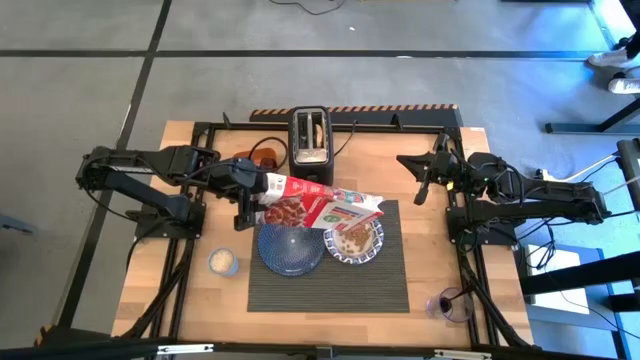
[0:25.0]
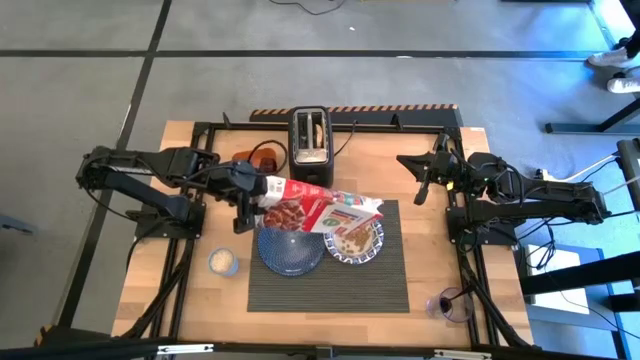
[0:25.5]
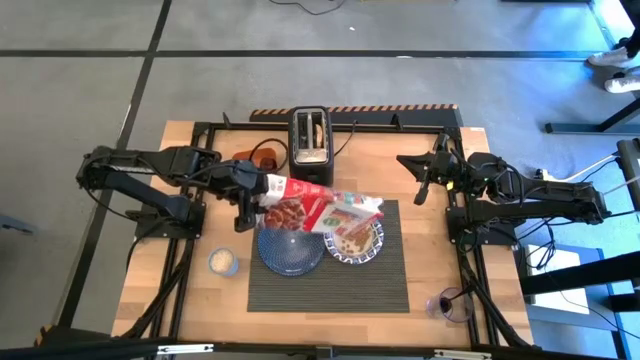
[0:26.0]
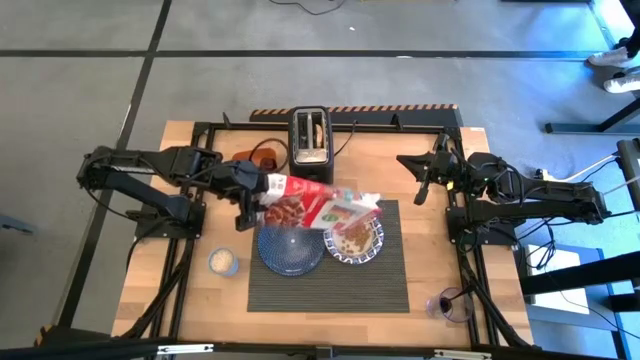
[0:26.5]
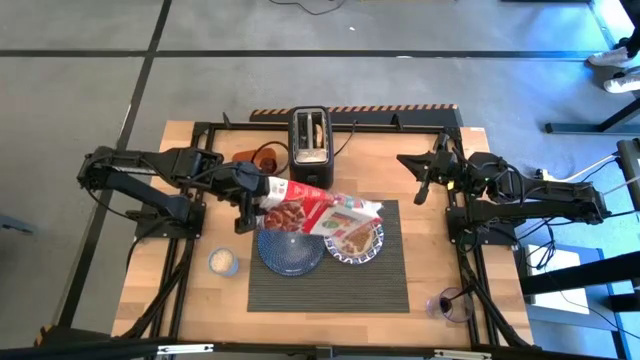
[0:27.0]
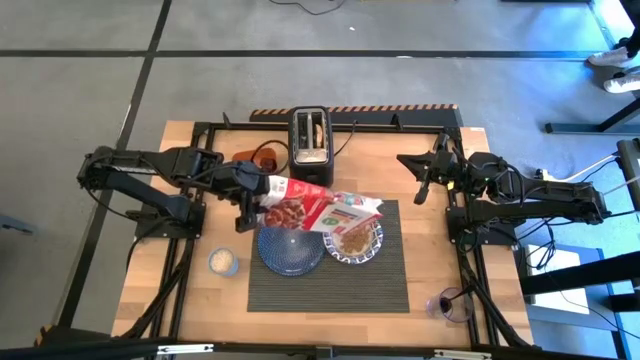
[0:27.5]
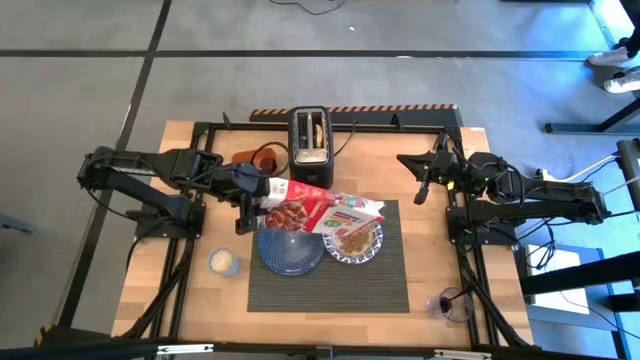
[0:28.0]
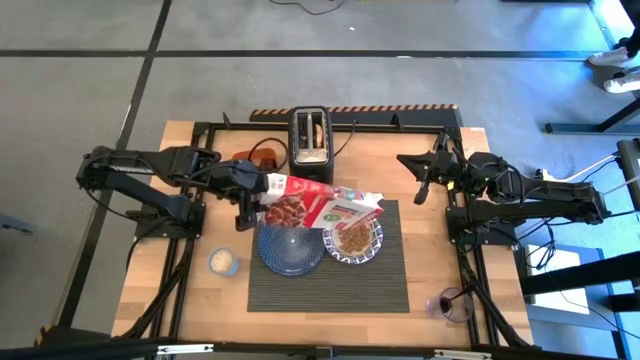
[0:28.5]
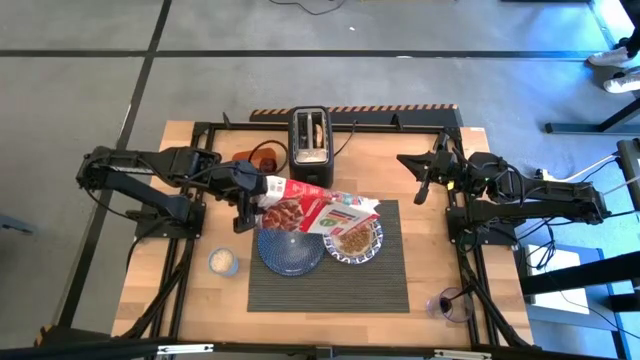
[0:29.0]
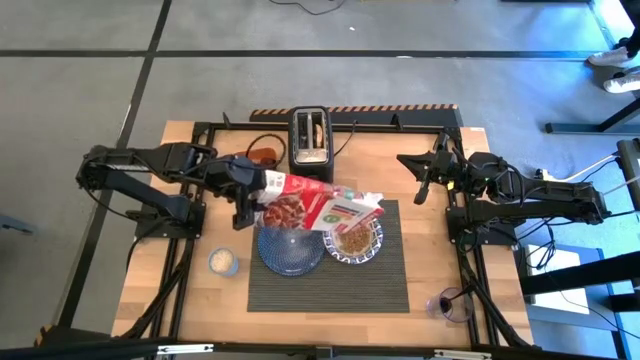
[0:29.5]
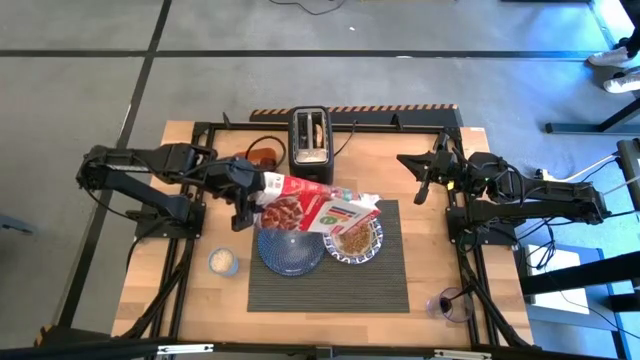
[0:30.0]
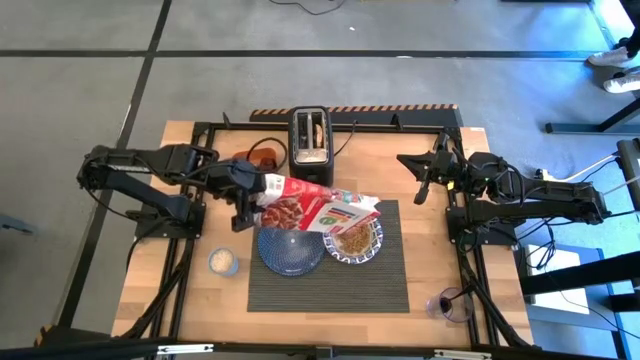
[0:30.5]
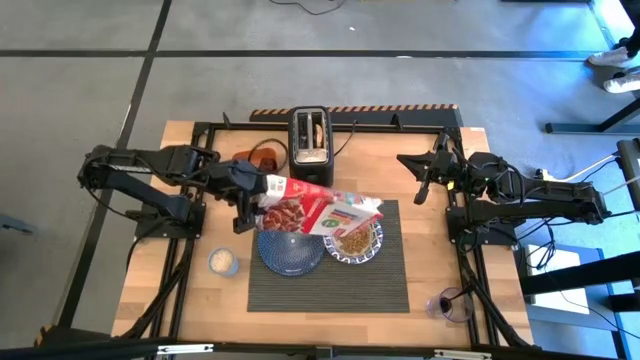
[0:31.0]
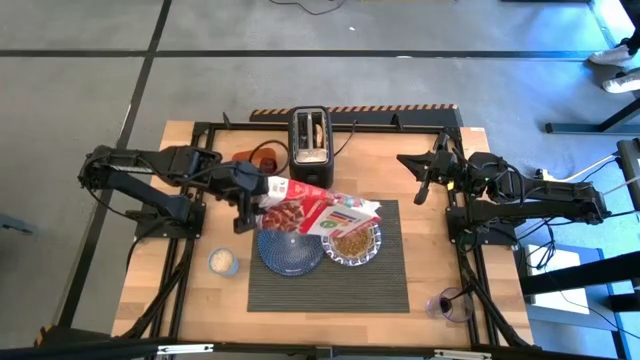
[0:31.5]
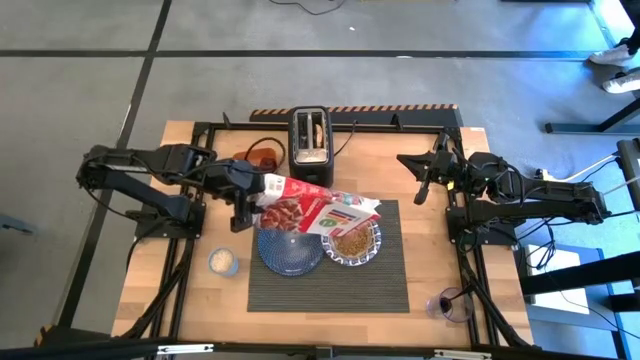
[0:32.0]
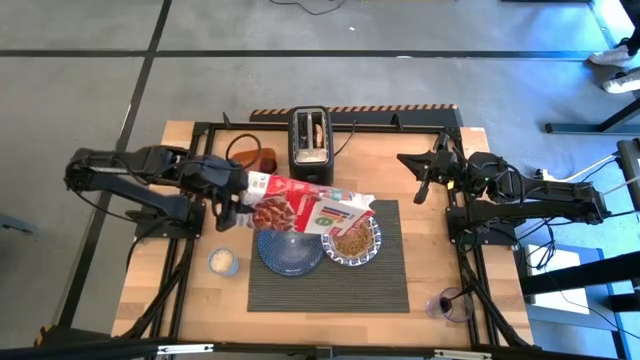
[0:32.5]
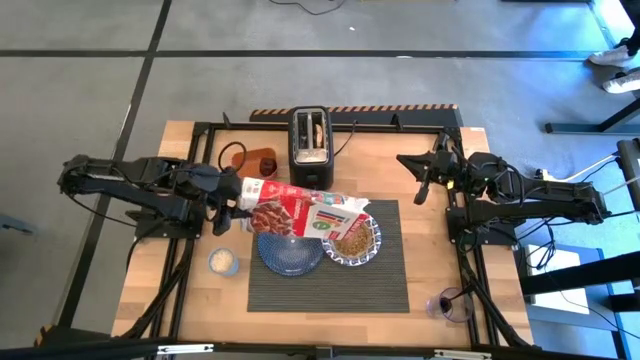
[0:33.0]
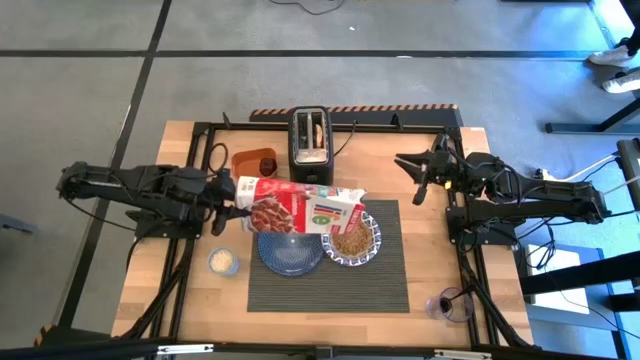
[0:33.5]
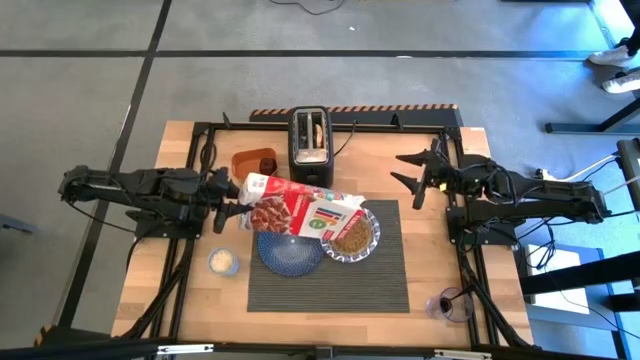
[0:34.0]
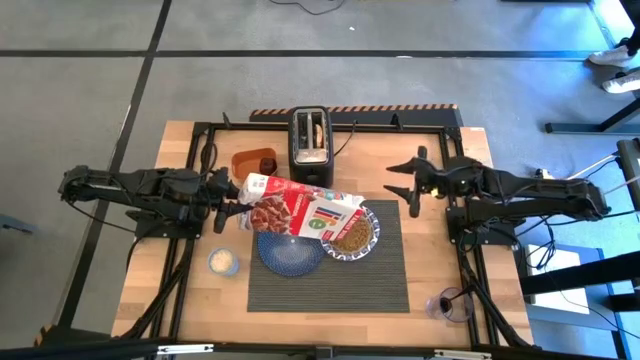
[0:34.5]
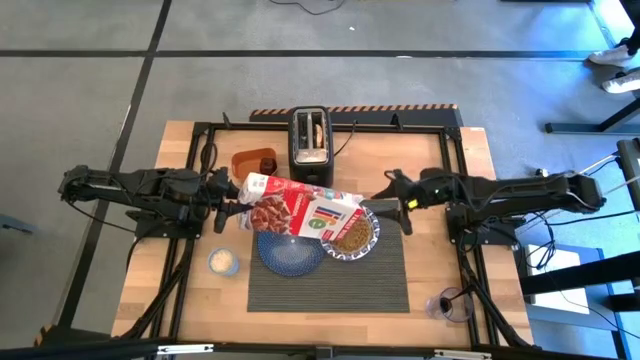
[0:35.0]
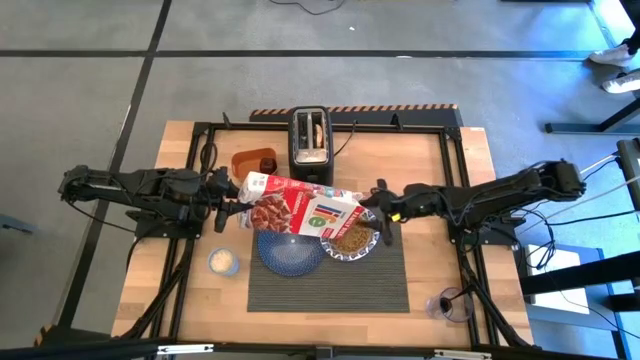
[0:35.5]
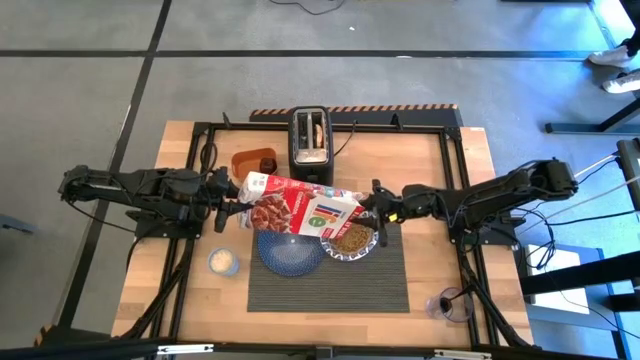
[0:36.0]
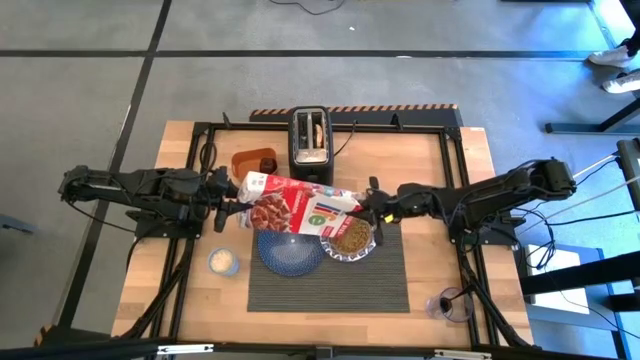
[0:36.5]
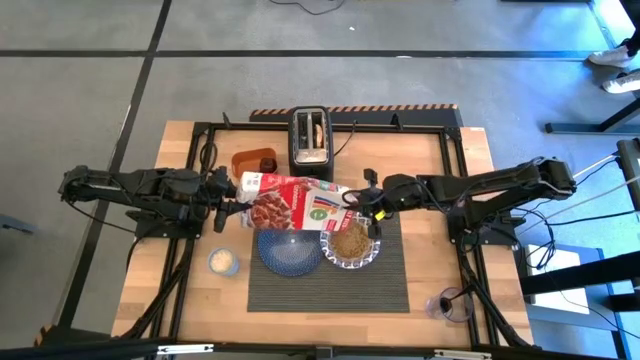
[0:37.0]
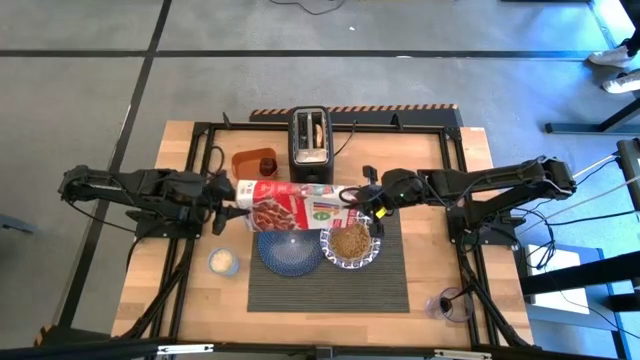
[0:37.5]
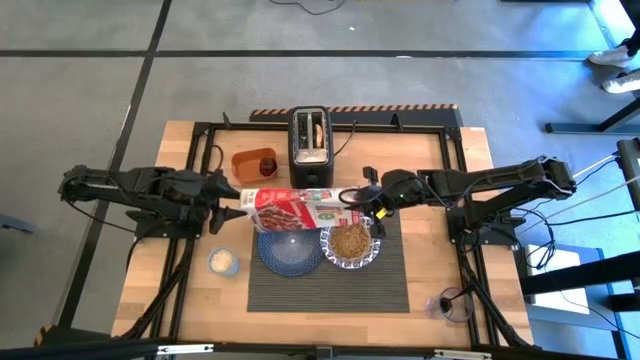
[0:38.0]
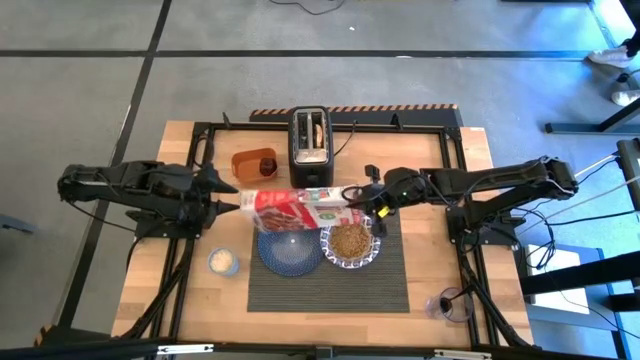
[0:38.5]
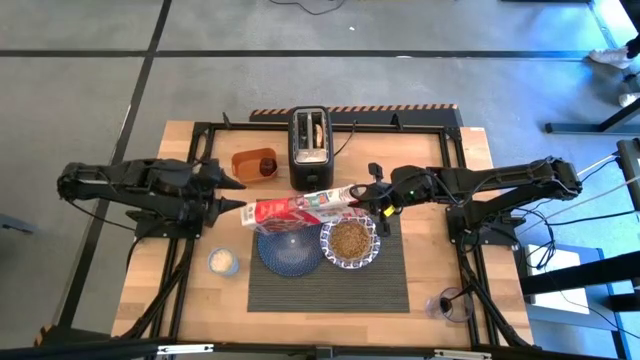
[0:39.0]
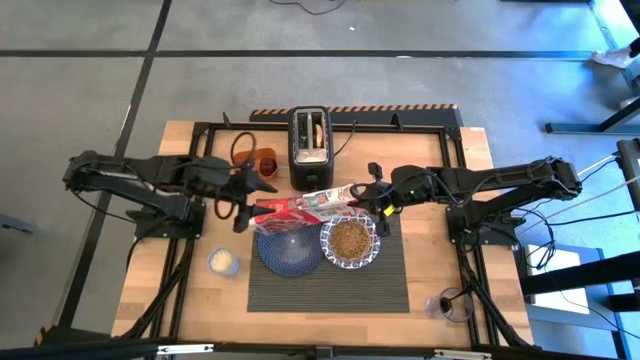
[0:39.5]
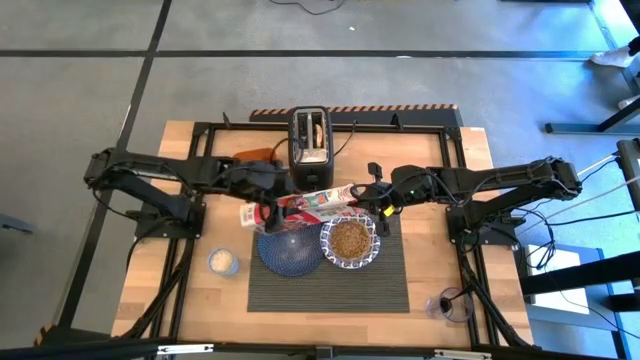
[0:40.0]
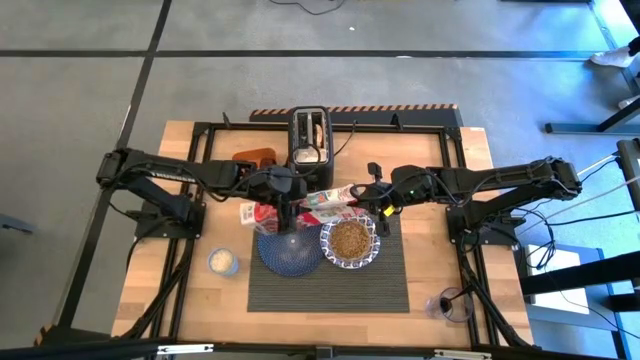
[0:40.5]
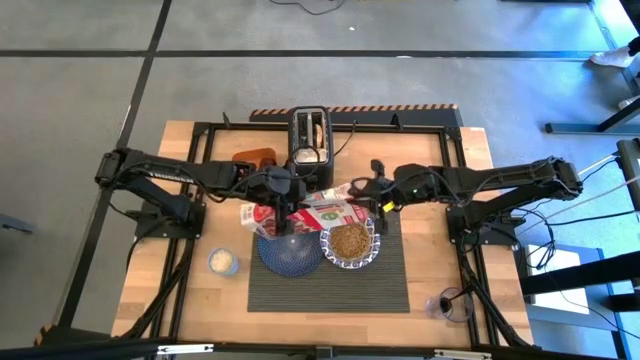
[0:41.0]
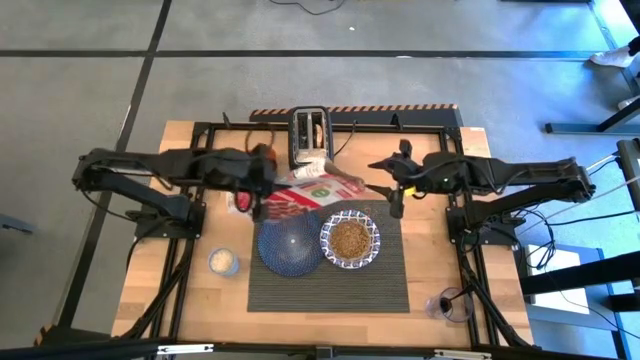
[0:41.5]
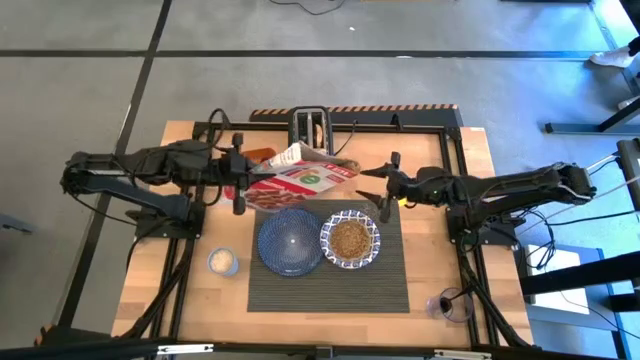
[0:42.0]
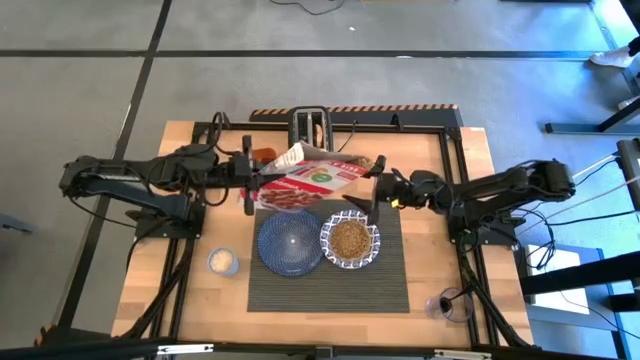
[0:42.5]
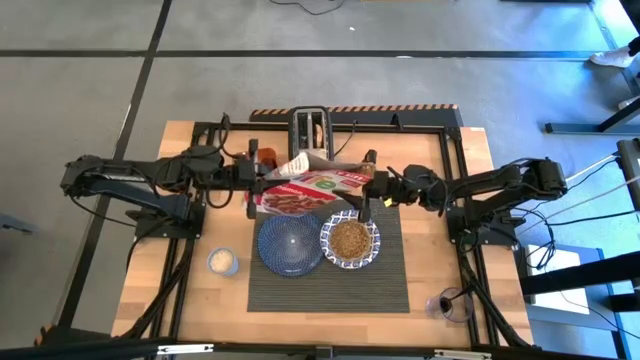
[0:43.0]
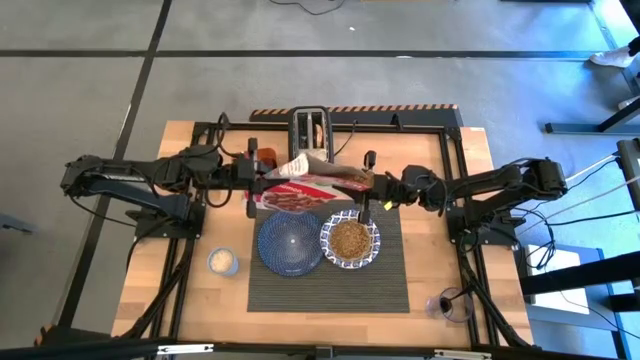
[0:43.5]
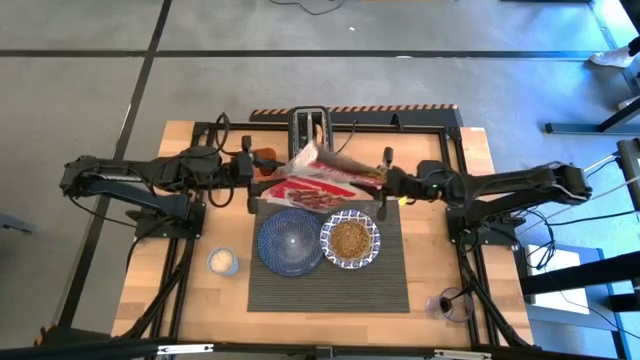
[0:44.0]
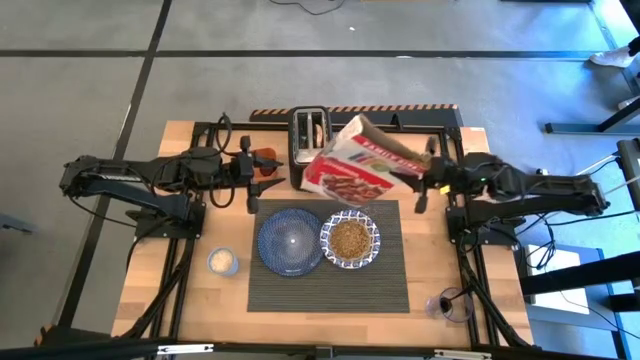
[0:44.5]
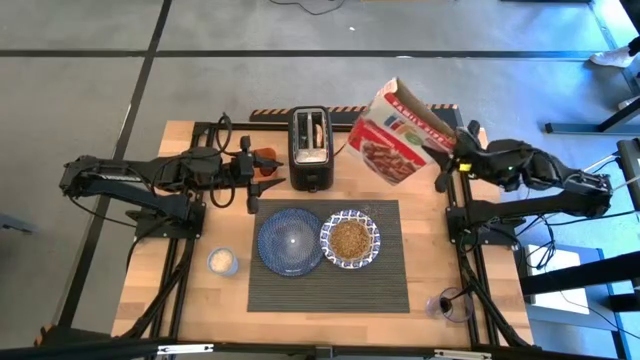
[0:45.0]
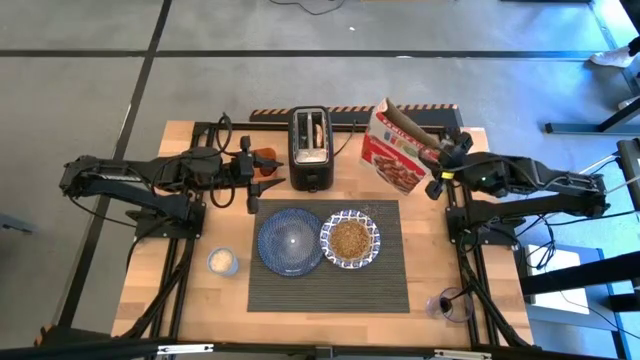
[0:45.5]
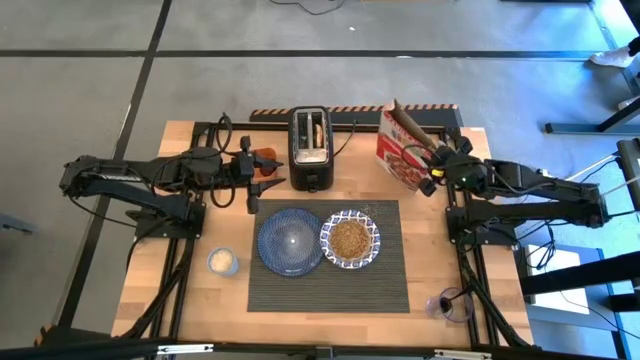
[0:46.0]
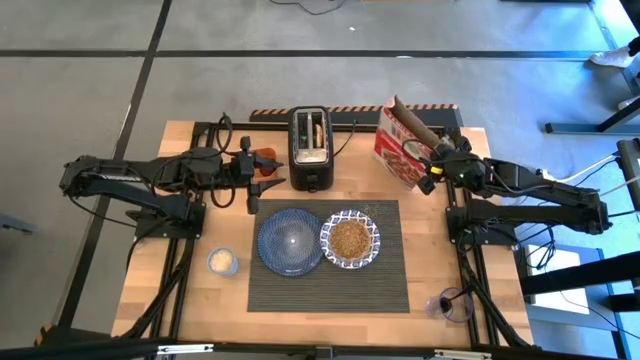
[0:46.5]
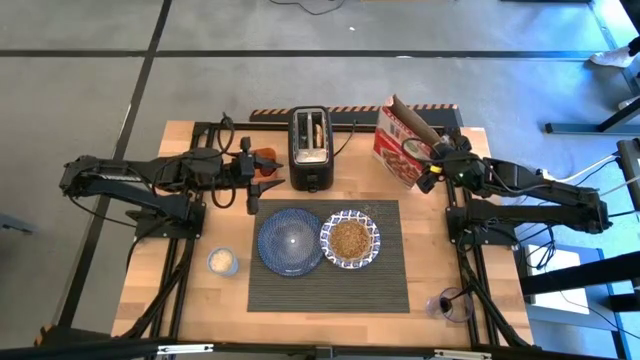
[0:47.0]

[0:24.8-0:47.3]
Task: Arrange a breakfast setting
Pour the cereal into the blue patterned bowl from the cereal box
